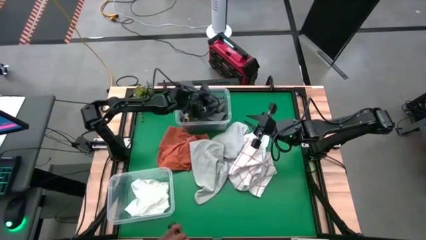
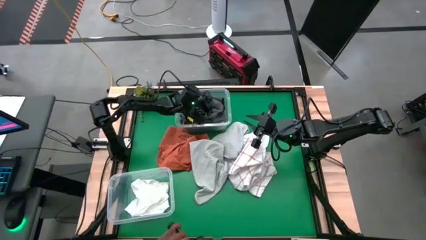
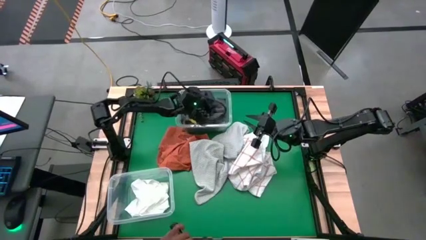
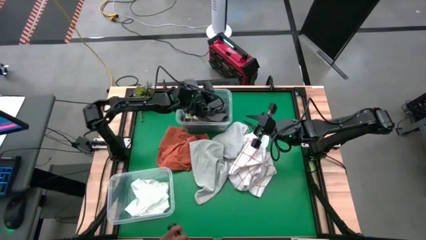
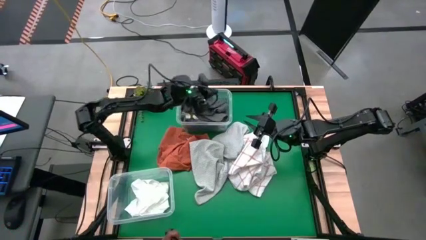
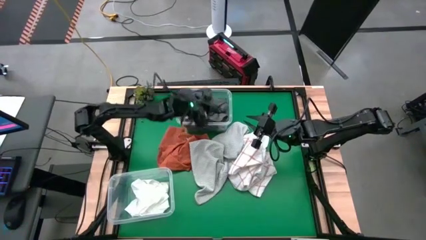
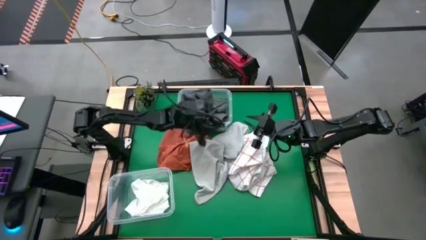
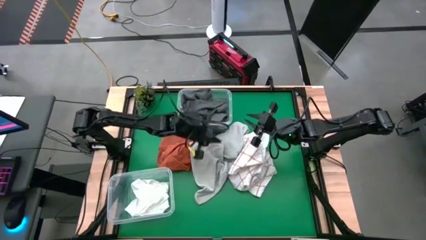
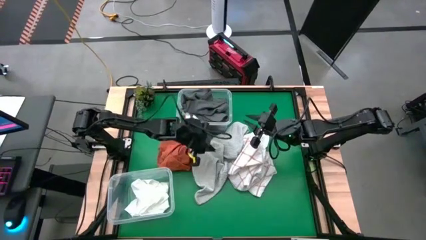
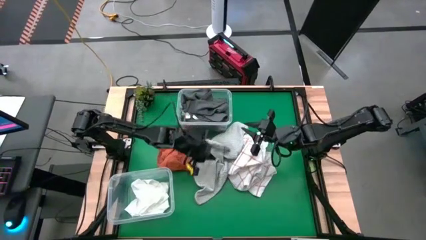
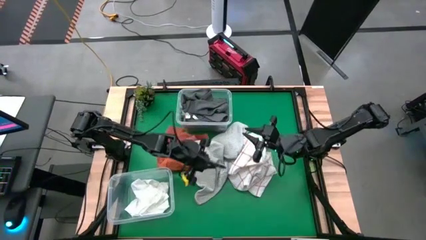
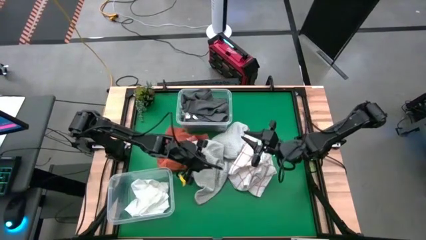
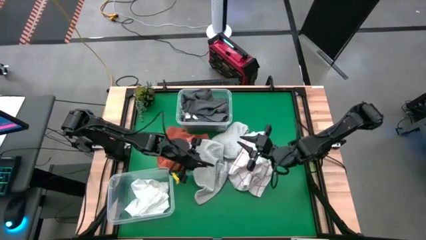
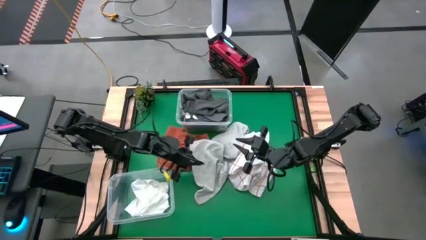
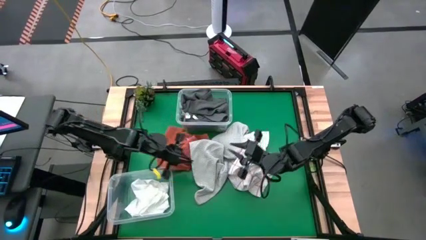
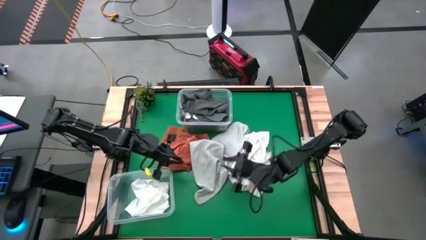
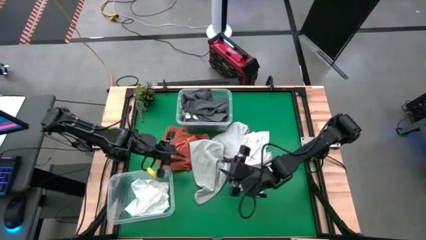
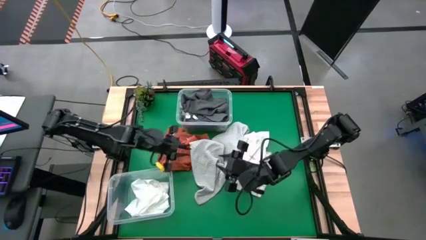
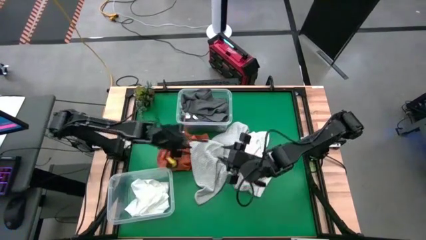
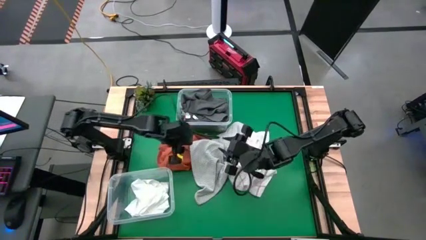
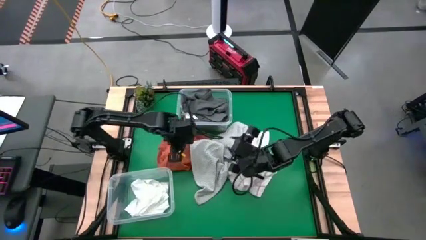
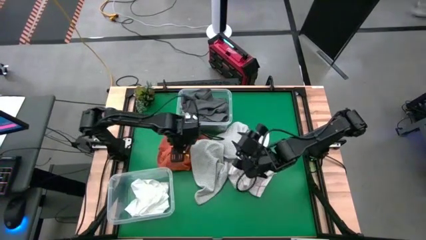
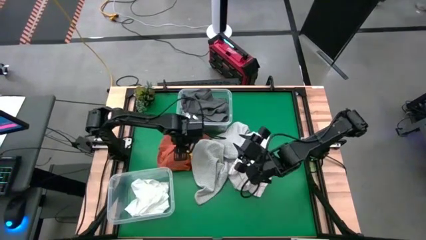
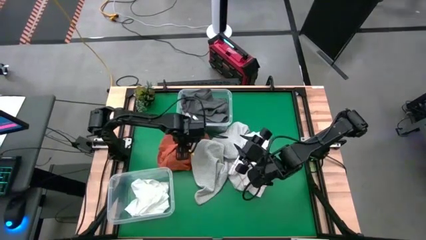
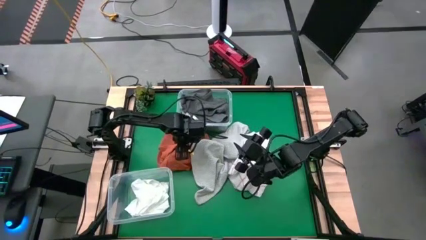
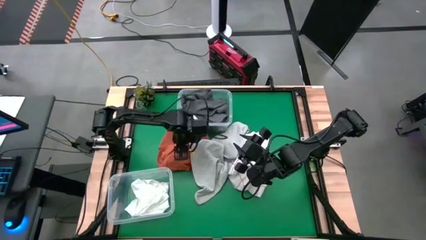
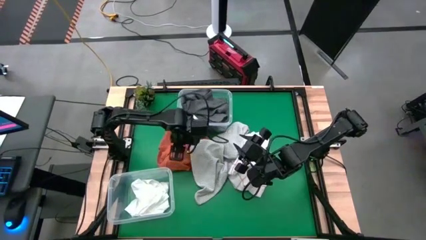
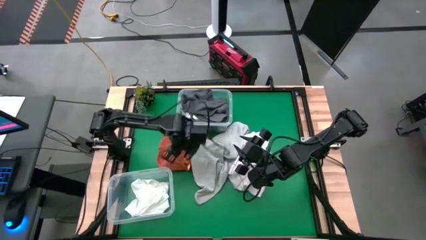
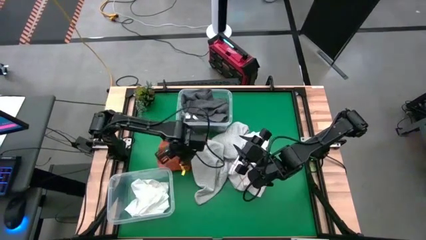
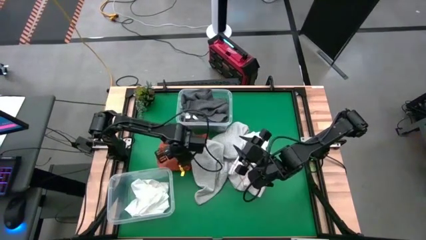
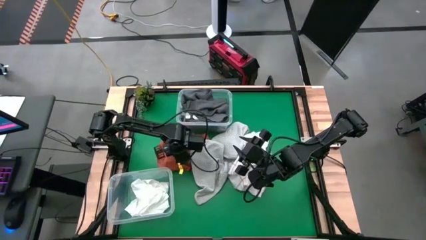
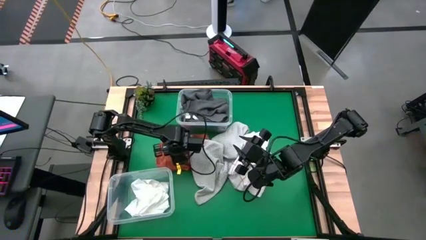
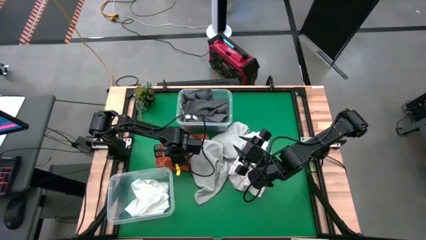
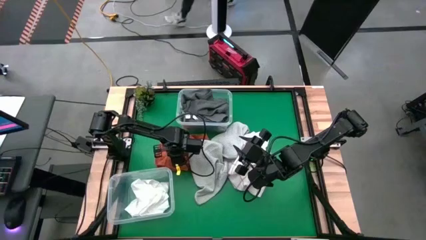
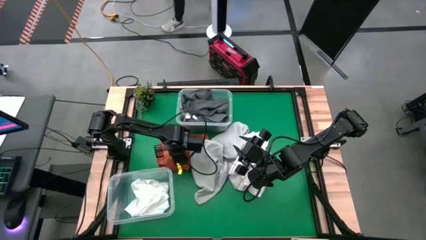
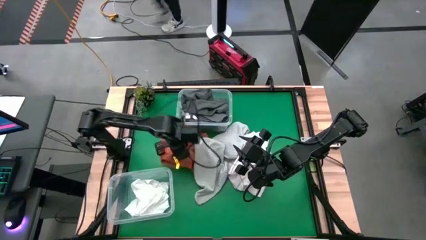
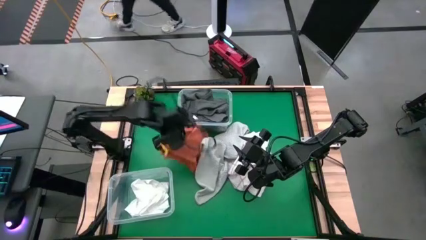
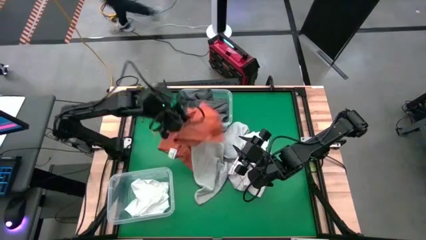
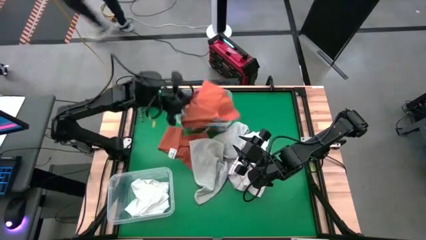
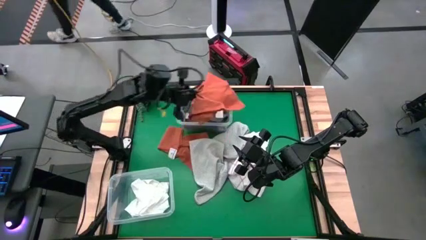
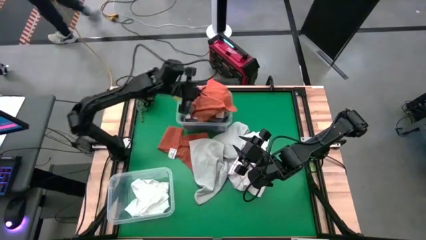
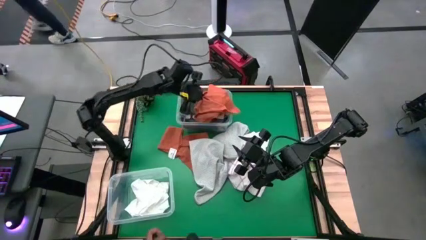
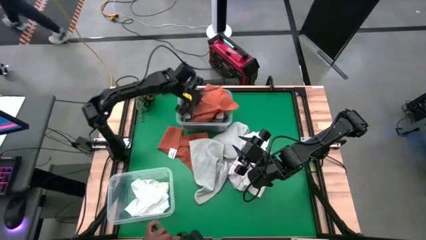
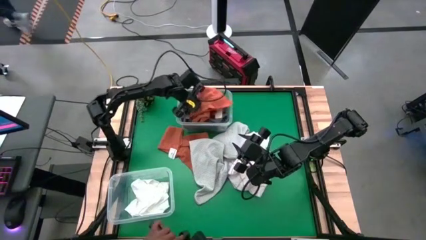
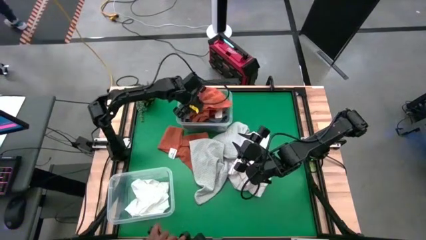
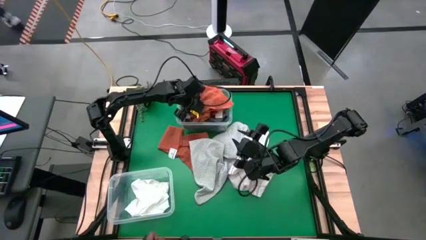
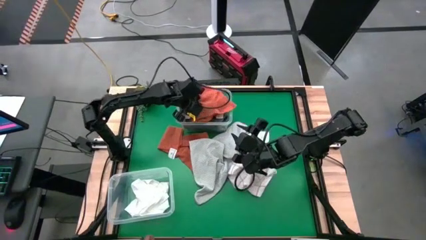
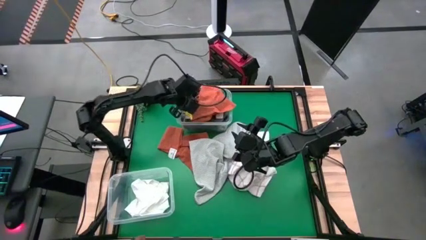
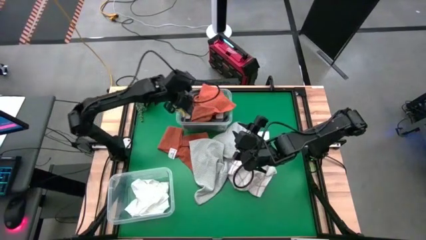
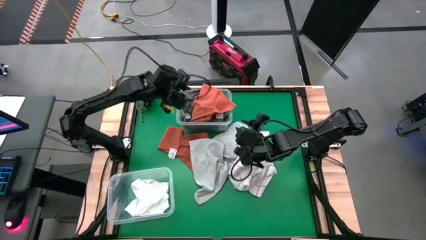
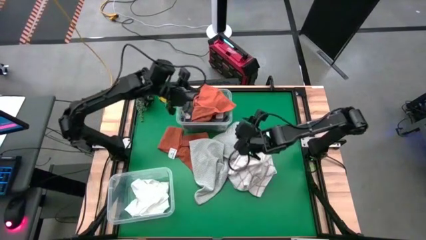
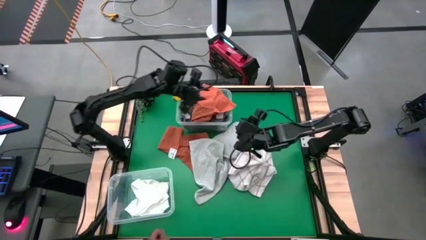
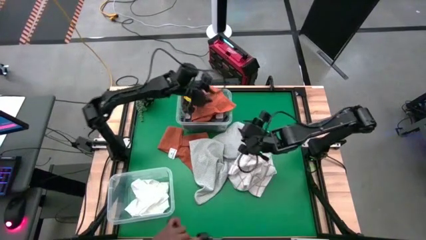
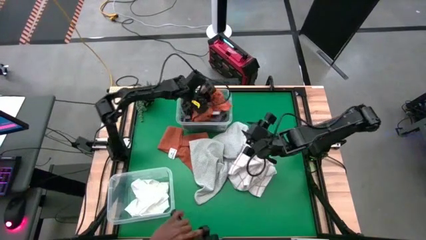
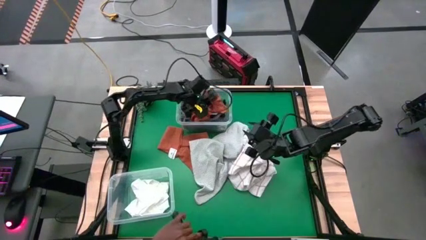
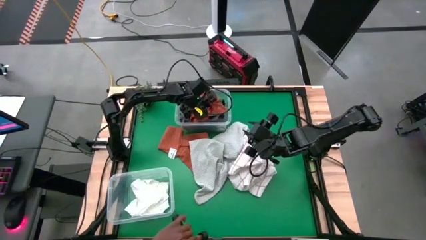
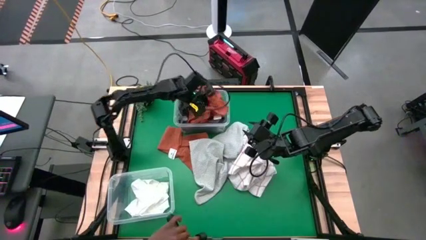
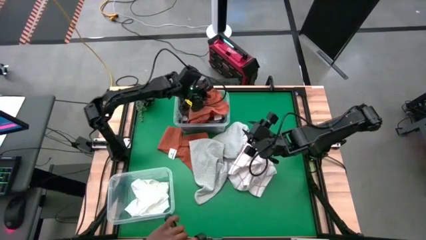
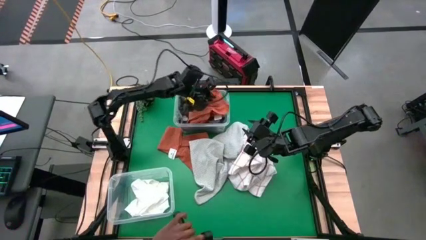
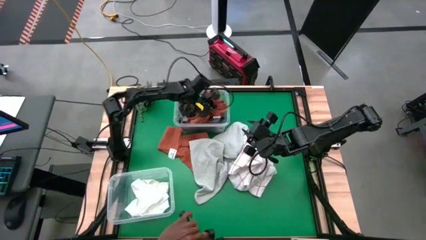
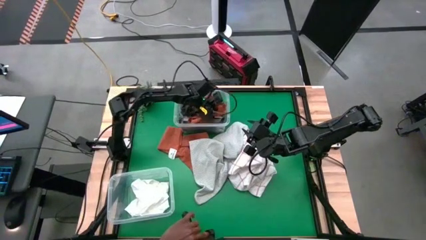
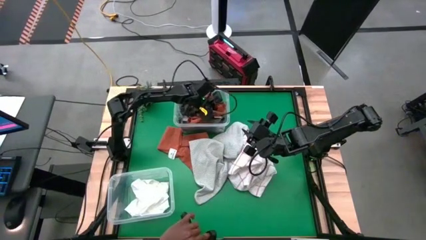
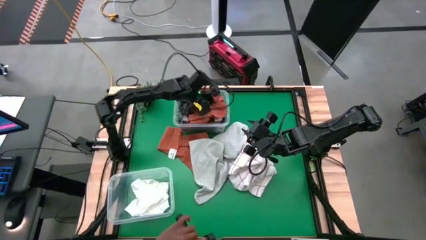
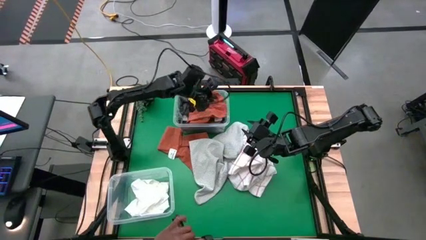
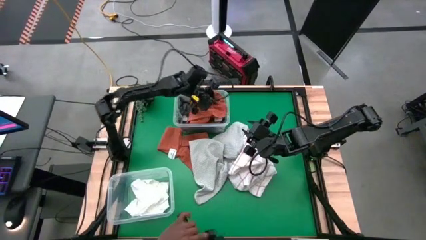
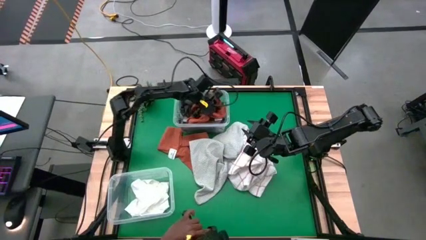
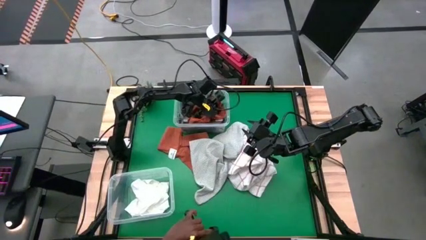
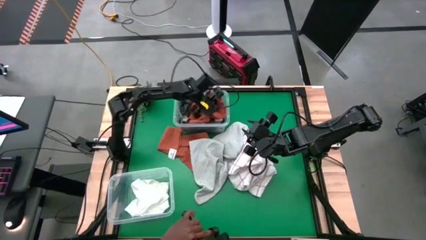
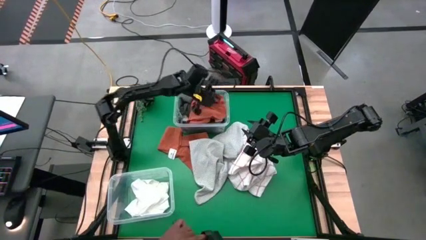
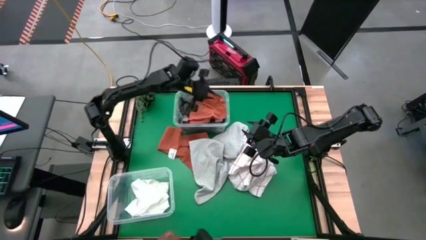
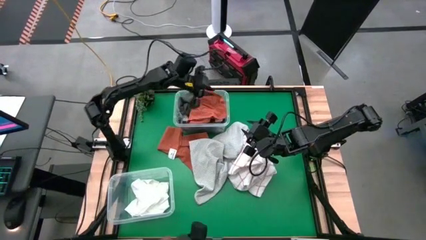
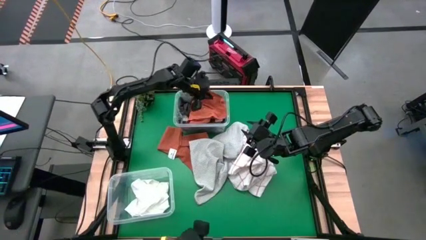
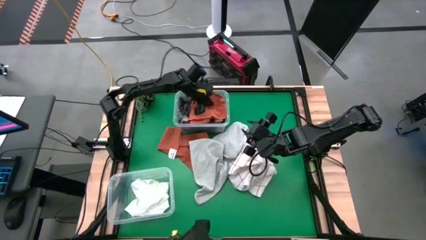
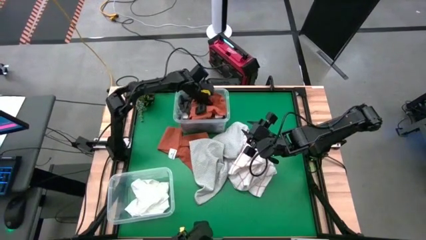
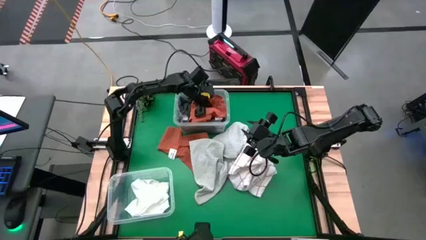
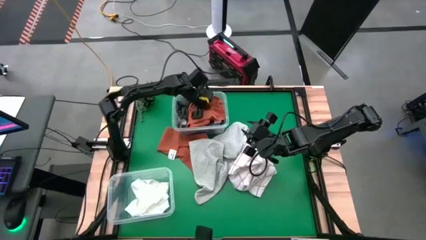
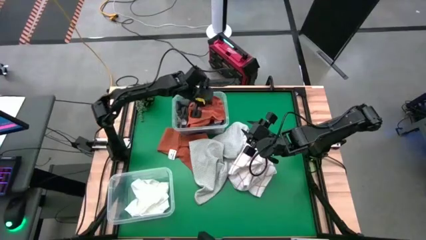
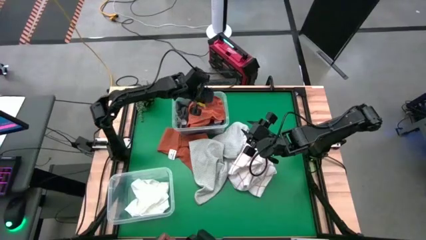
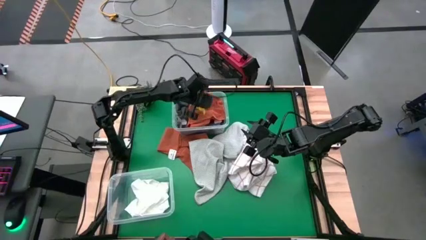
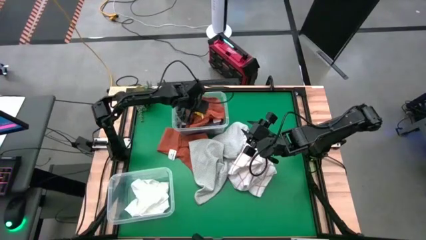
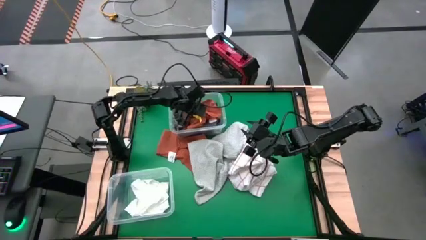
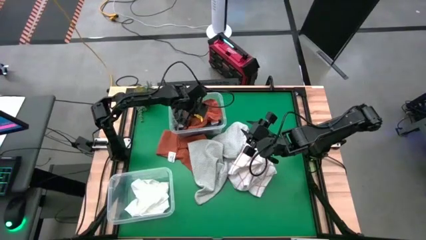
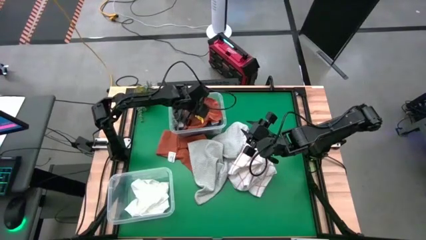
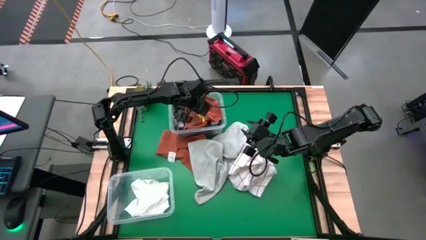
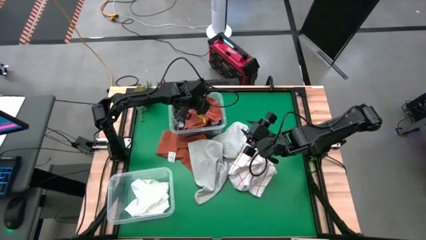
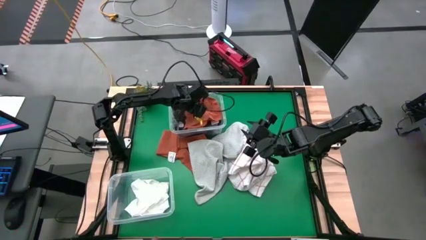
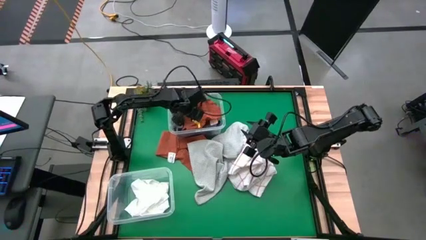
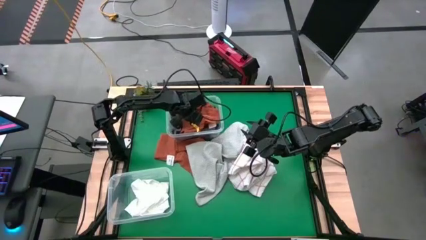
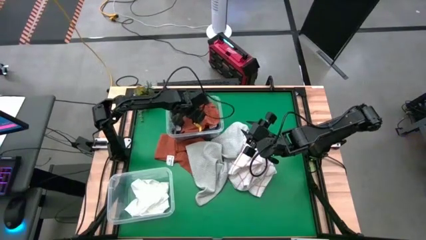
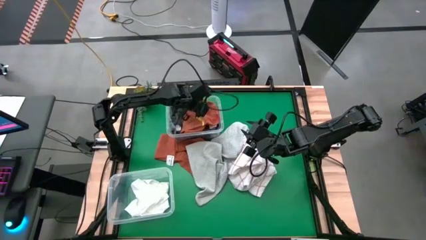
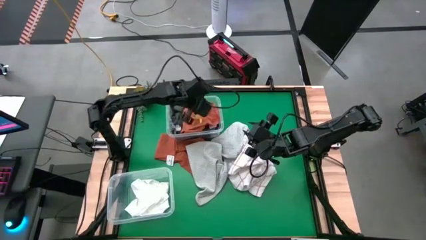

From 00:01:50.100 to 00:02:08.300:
Task: Sort towels by color in basket
Put the top orange towel into the top transparent bin
